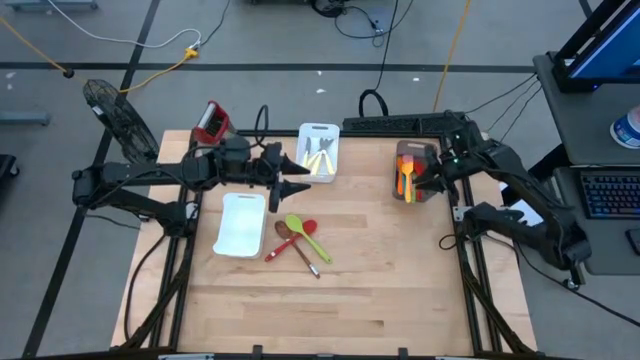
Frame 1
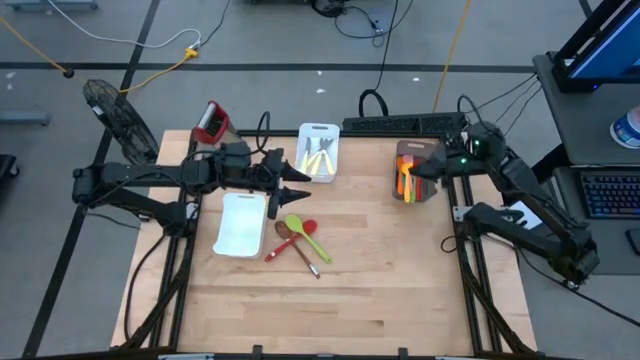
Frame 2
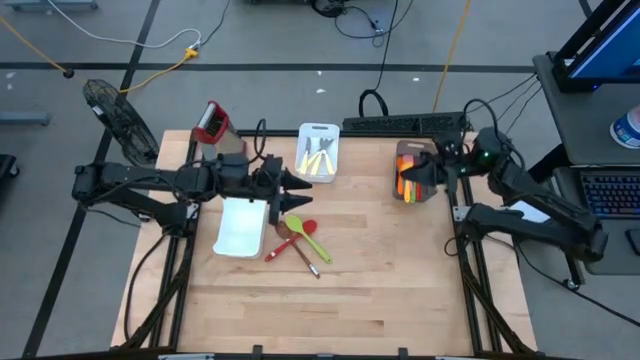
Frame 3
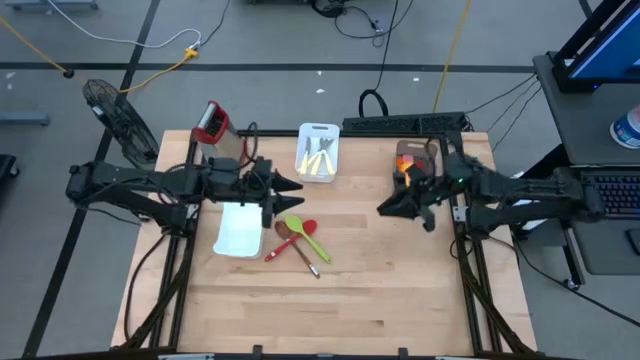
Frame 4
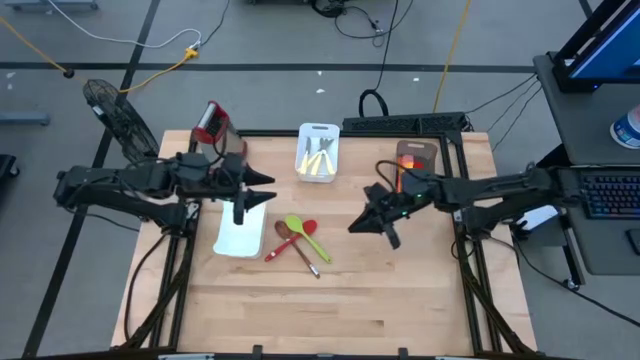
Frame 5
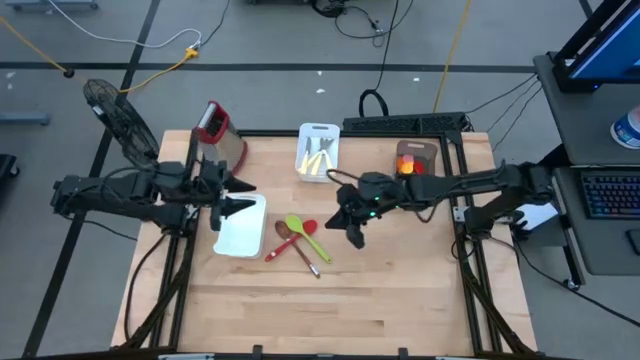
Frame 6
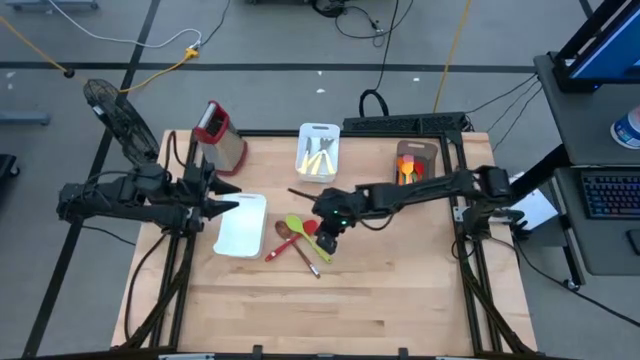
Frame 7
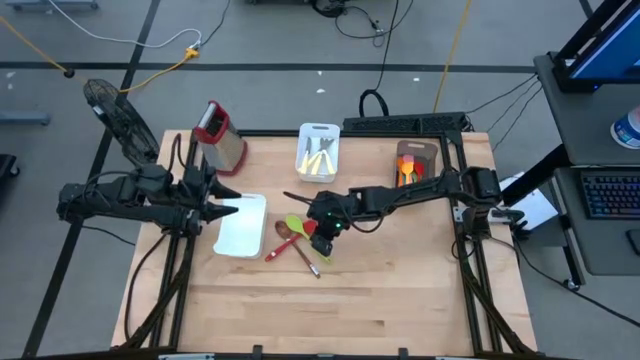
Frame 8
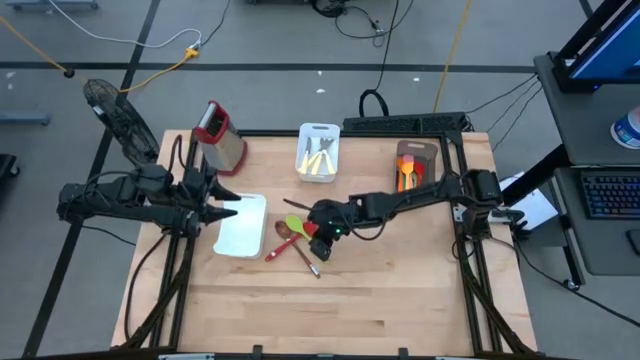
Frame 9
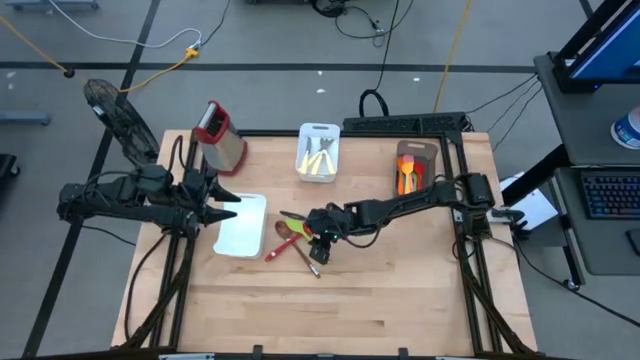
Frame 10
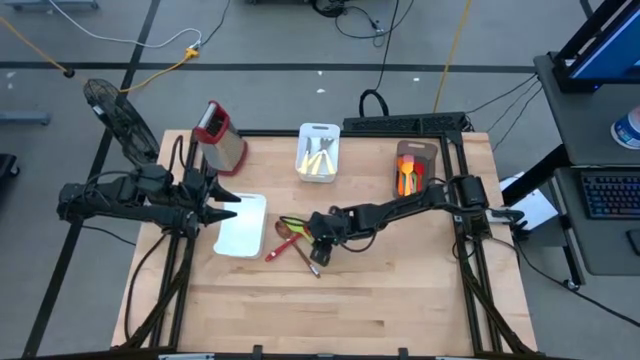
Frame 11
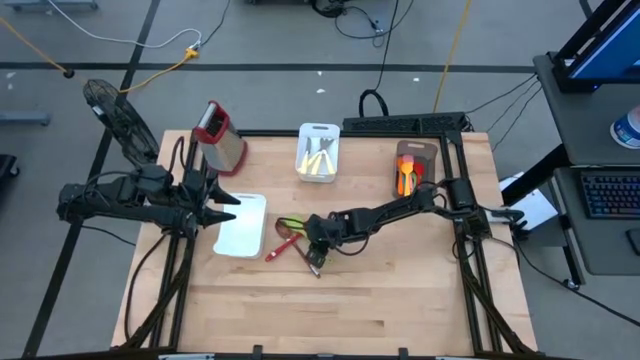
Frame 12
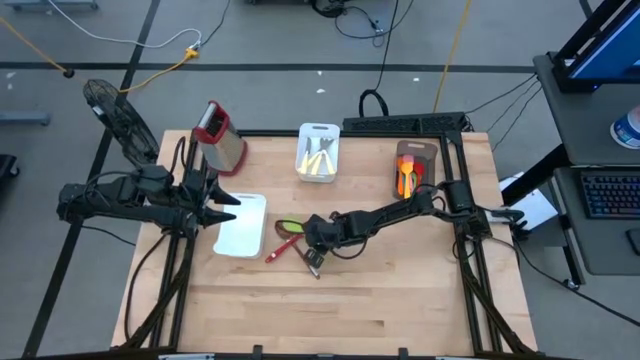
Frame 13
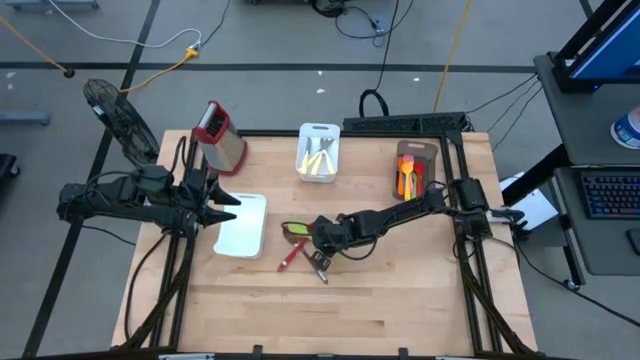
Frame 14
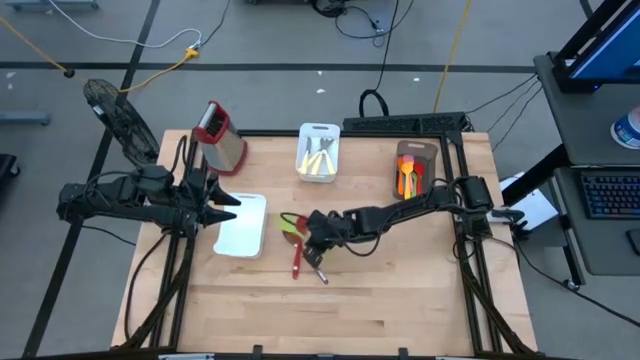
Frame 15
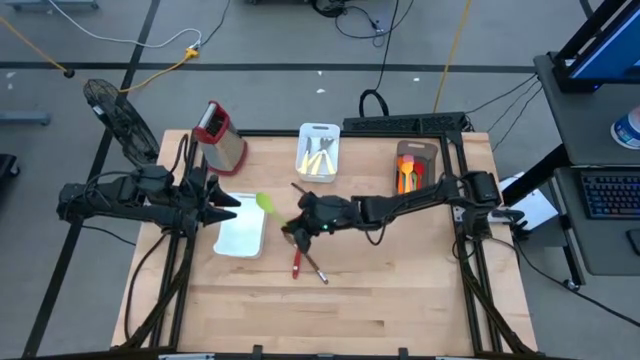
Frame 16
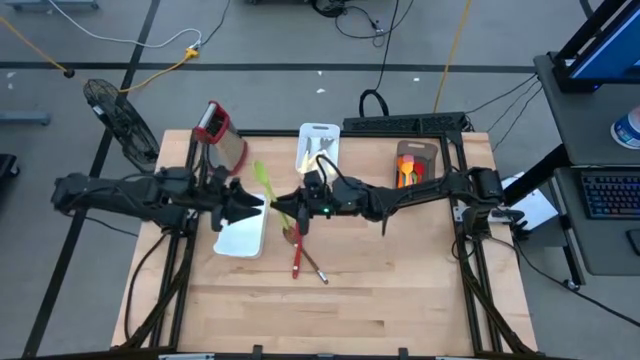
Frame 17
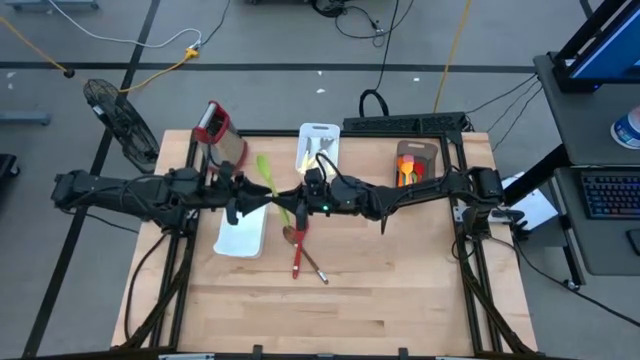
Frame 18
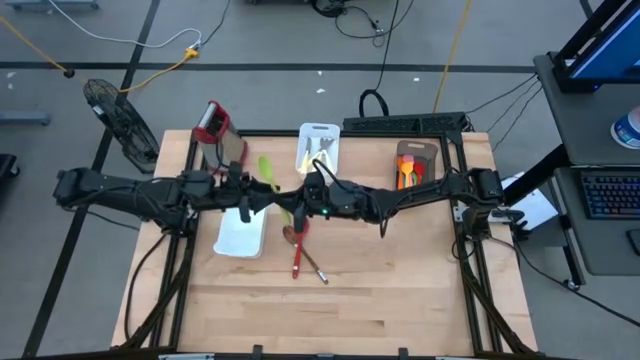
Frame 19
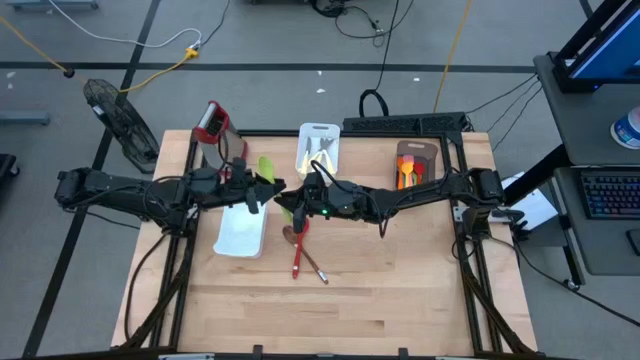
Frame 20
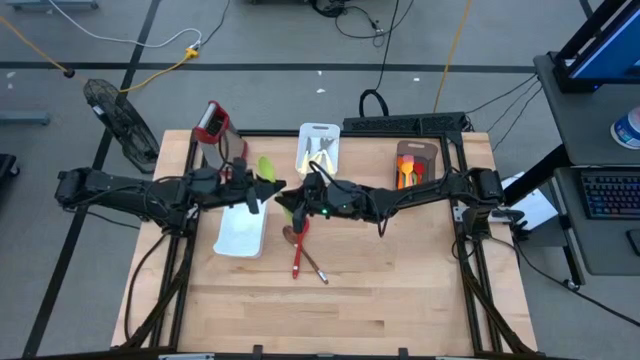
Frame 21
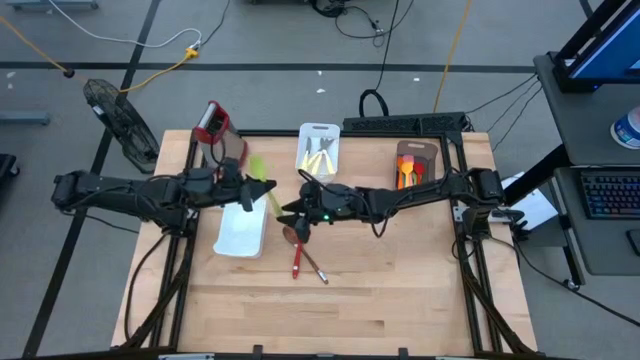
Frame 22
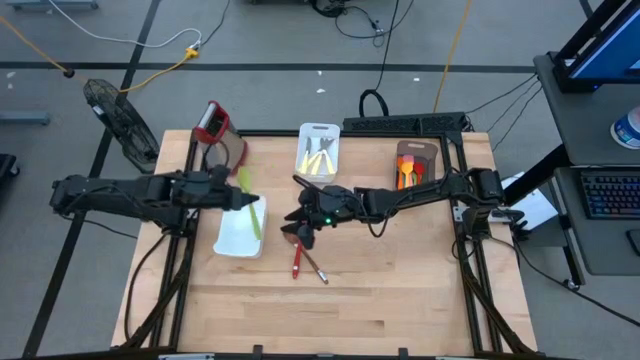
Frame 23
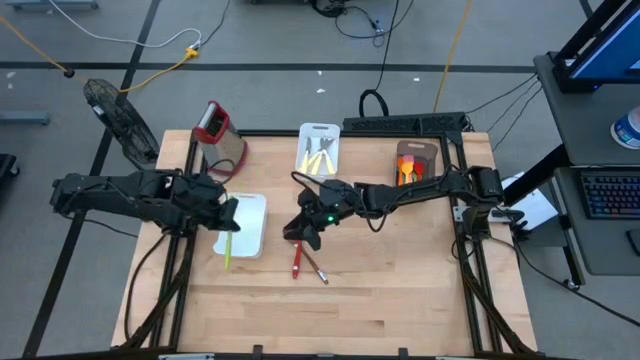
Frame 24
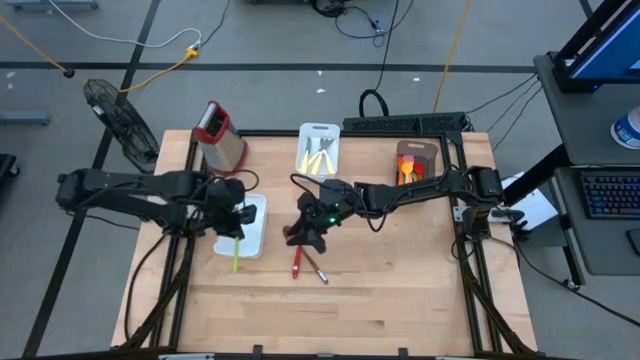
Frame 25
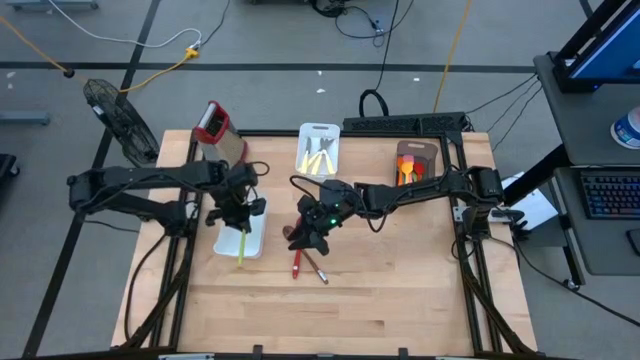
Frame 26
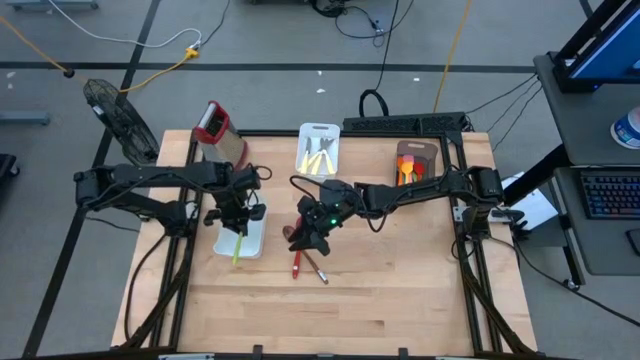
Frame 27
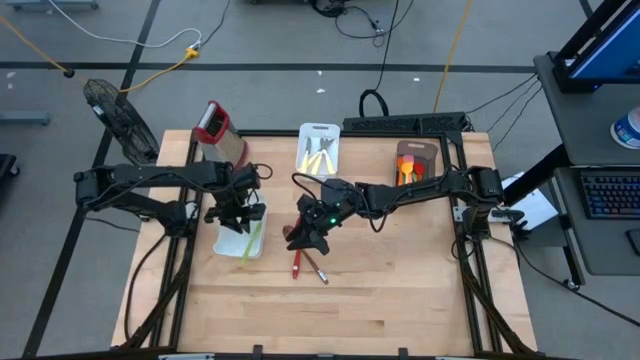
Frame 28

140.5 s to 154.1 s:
Task: Pick & Place Kitchen Items
Put the green serving spoon into the bottom white bin

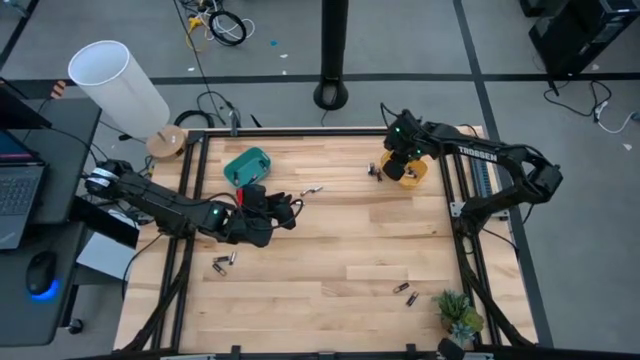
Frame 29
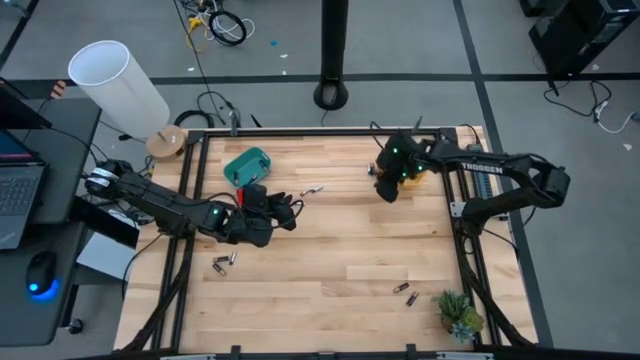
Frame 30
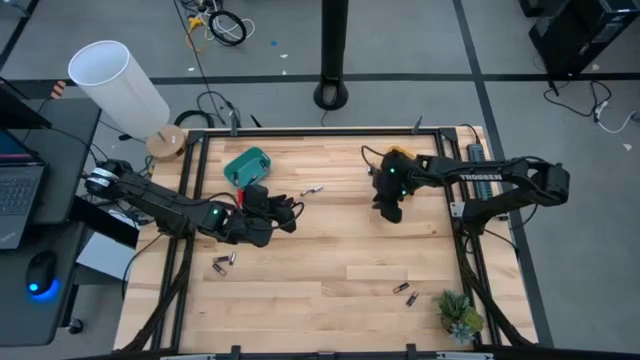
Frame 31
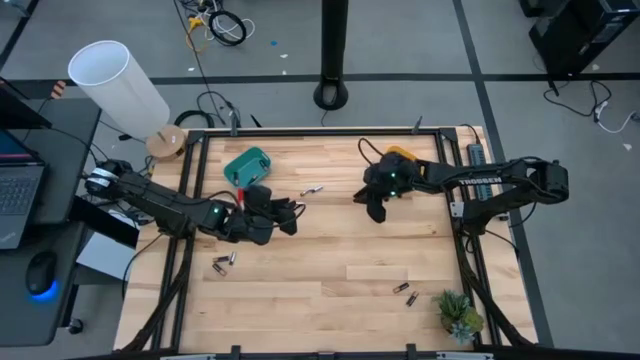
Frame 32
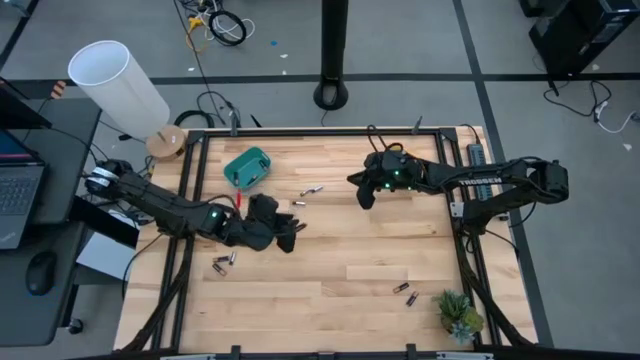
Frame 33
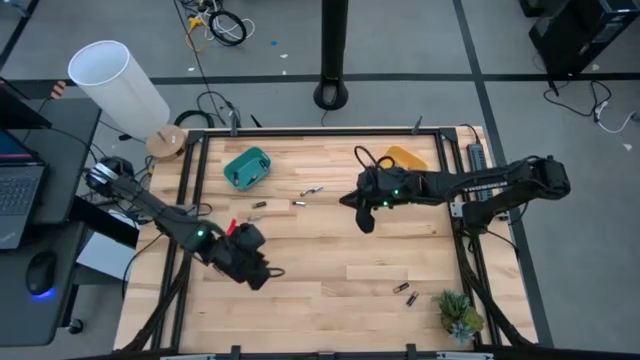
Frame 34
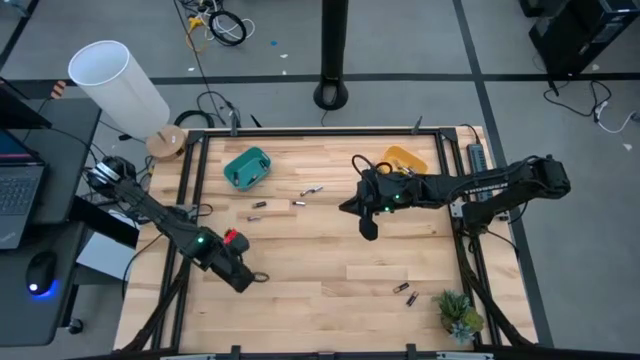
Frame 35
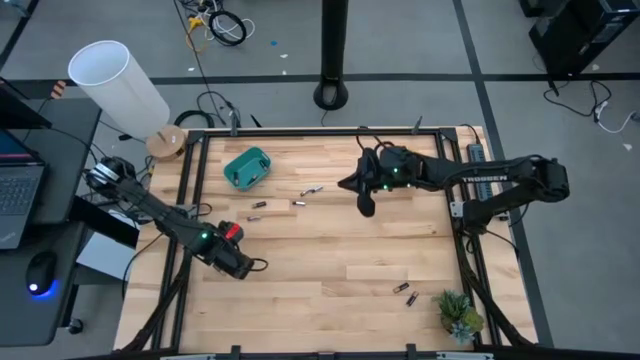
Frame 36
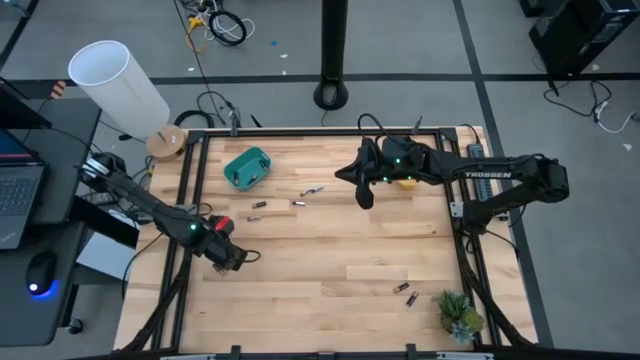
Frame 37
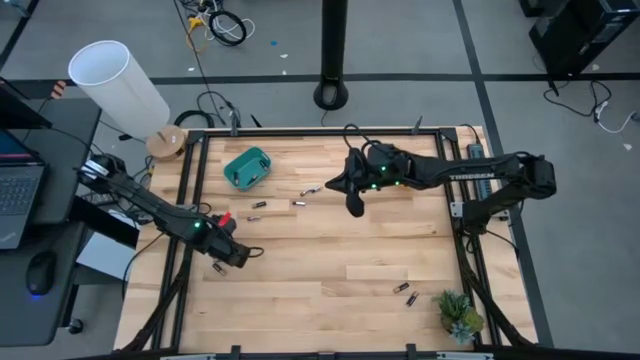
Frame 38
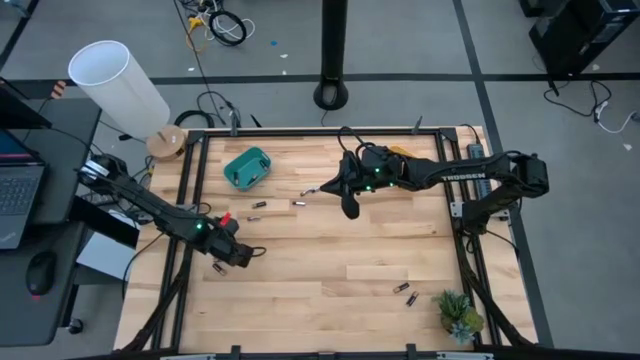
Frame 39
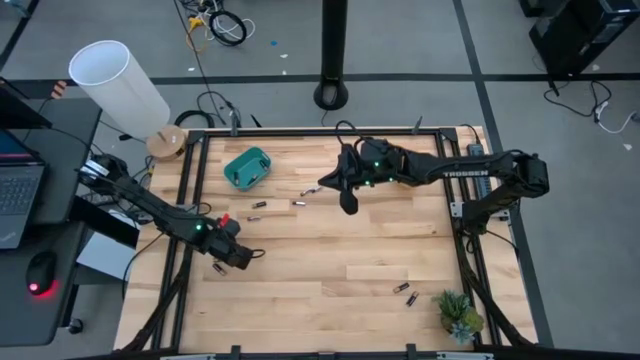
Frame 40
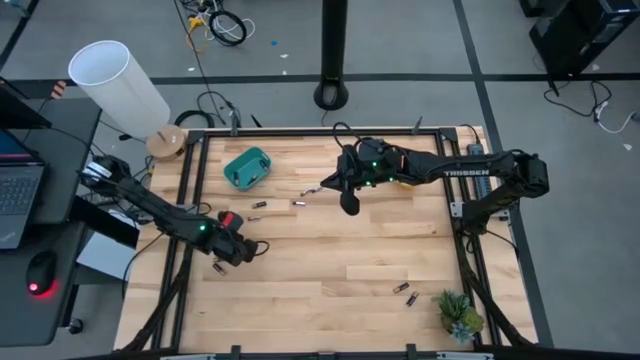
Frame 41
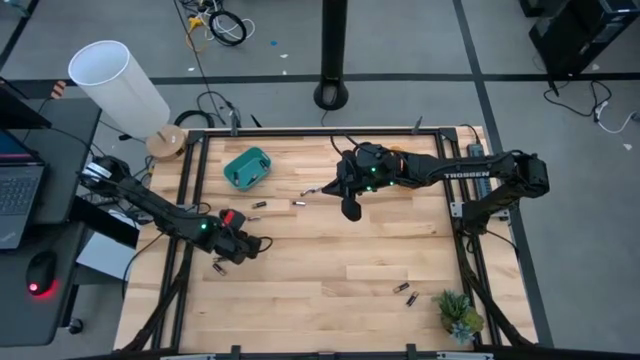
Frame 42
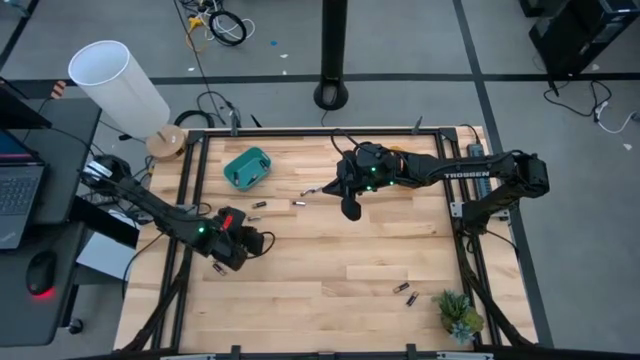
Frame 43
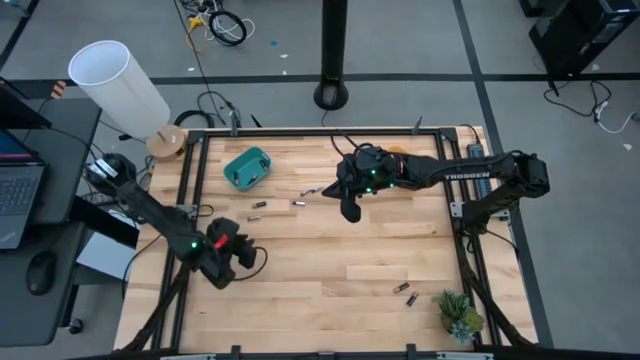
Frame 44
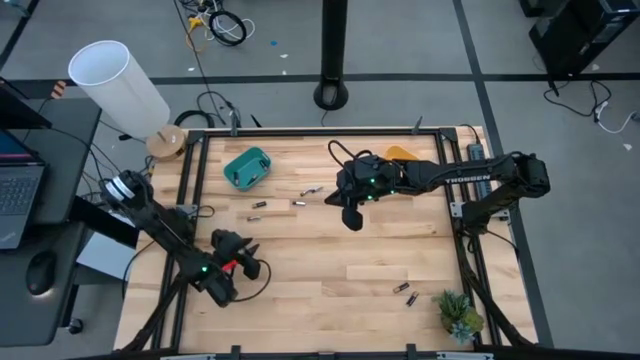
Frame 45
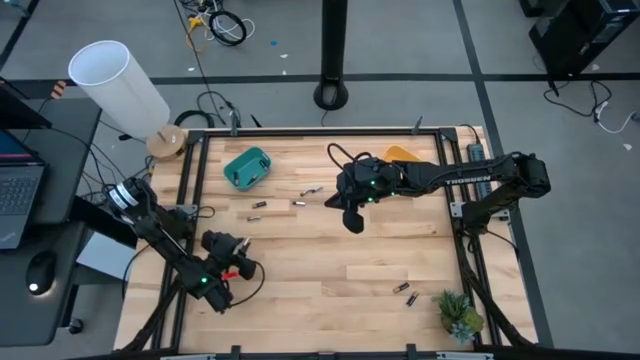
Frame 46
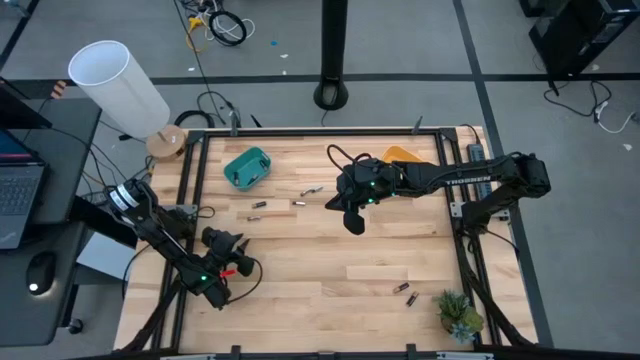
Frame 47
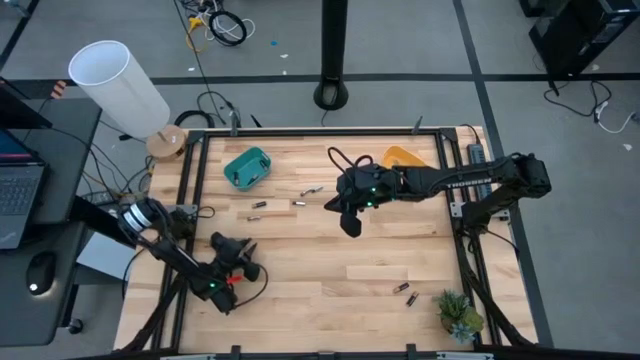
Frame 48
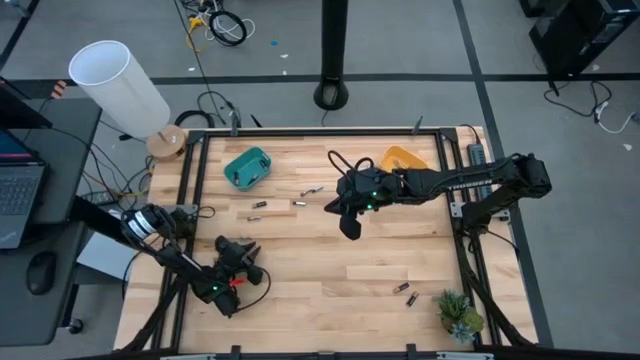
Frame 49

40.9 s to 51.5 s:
Task: Sort batteries
Put the silver battery into the yellow bin
